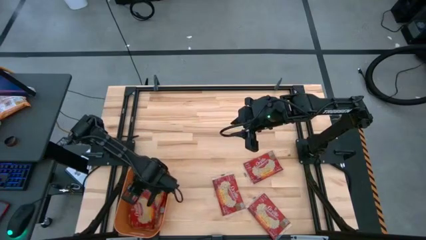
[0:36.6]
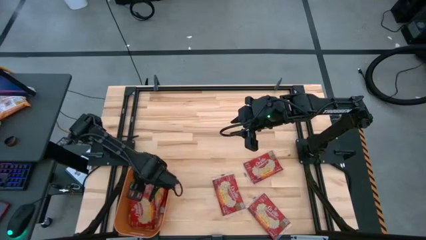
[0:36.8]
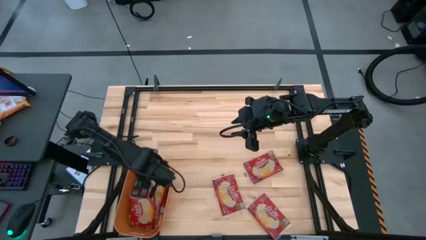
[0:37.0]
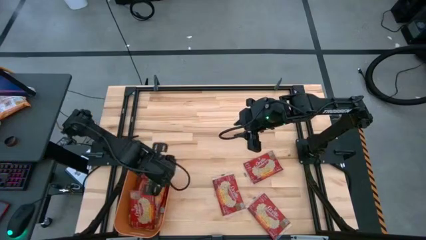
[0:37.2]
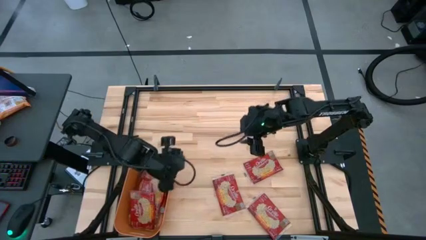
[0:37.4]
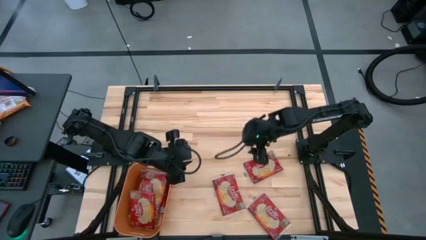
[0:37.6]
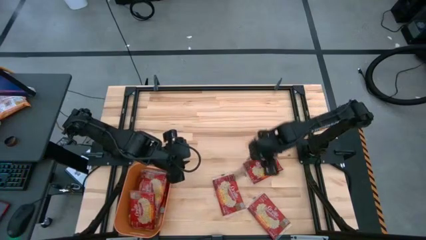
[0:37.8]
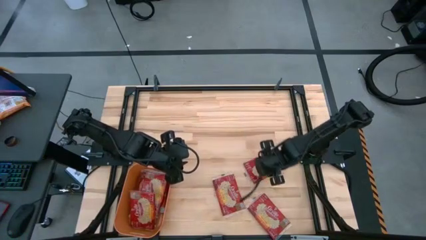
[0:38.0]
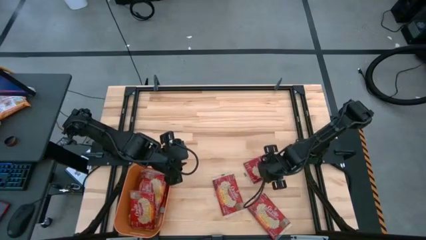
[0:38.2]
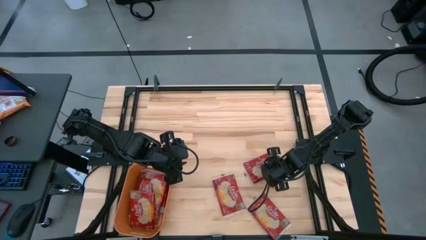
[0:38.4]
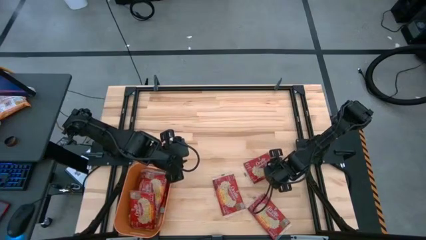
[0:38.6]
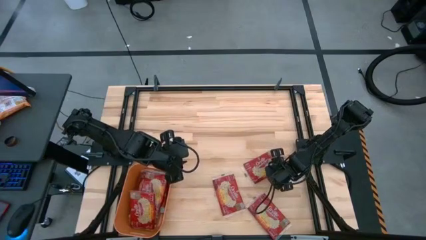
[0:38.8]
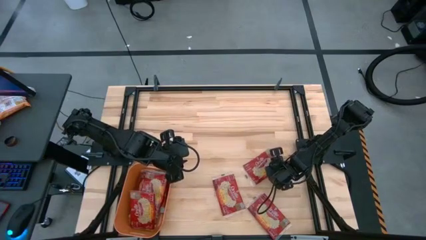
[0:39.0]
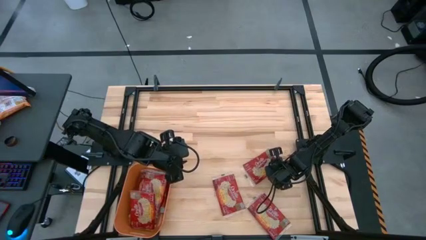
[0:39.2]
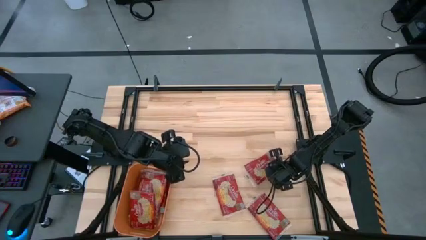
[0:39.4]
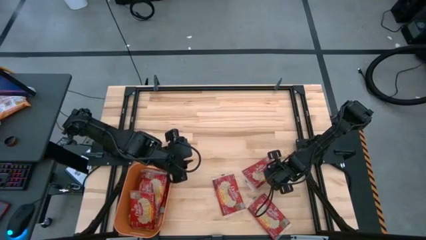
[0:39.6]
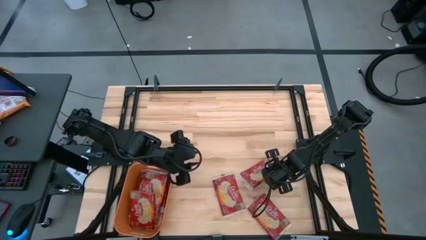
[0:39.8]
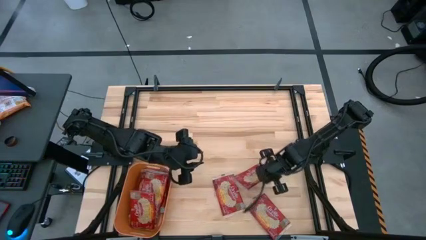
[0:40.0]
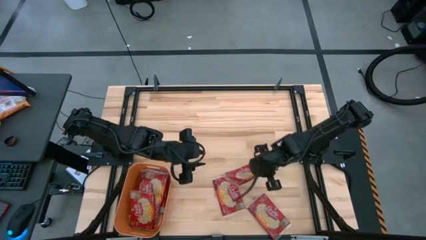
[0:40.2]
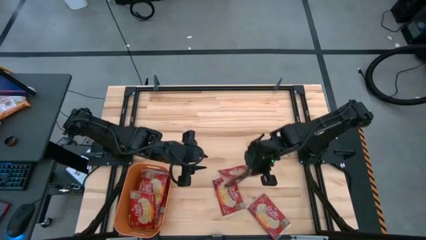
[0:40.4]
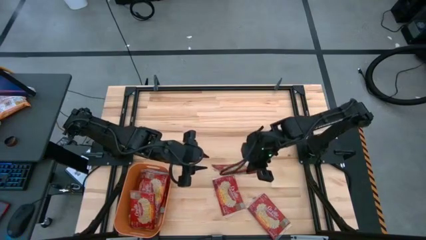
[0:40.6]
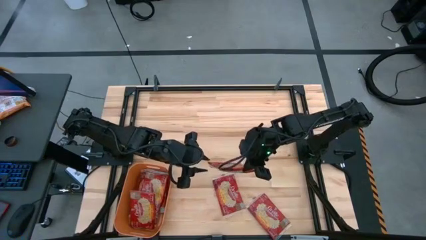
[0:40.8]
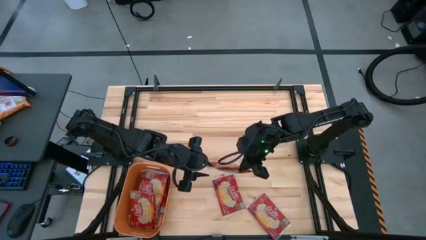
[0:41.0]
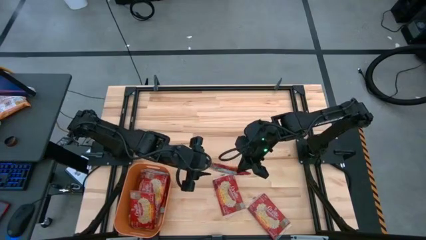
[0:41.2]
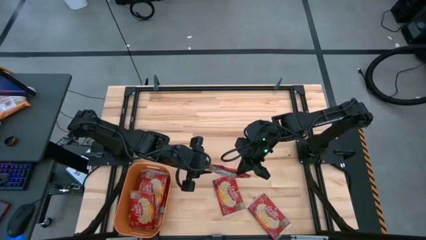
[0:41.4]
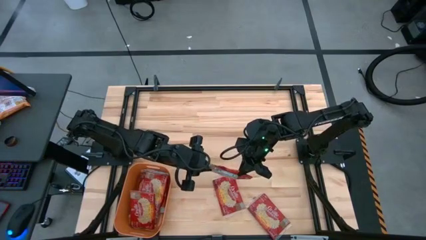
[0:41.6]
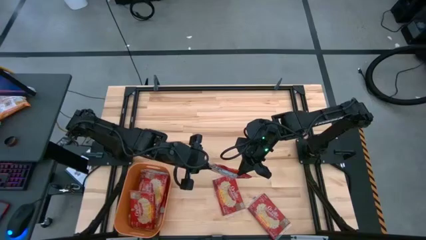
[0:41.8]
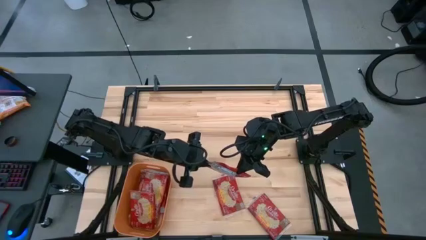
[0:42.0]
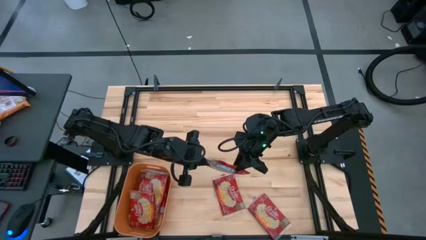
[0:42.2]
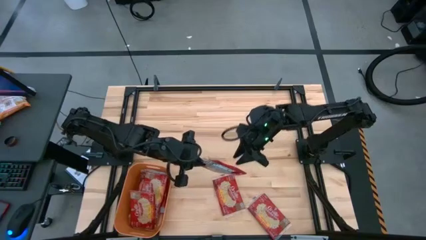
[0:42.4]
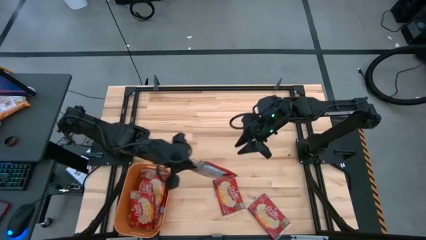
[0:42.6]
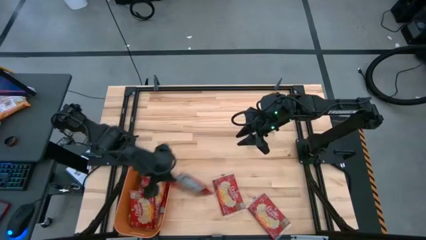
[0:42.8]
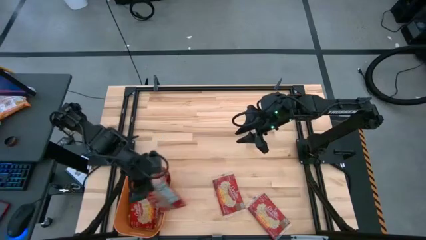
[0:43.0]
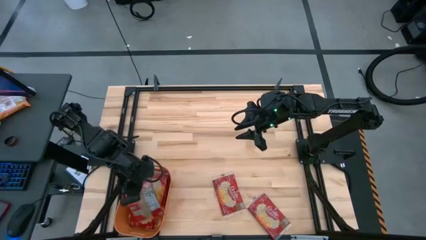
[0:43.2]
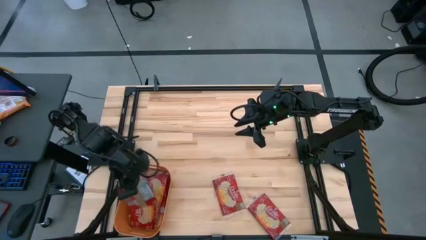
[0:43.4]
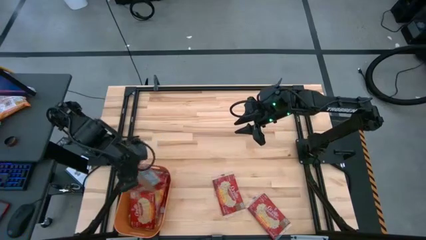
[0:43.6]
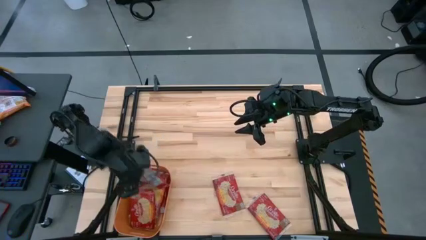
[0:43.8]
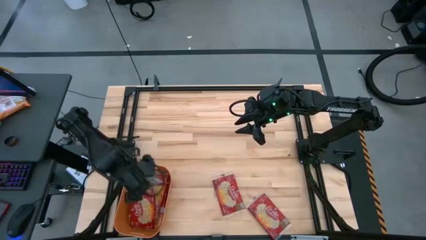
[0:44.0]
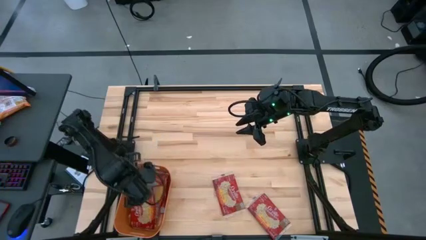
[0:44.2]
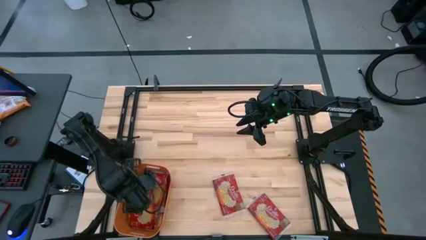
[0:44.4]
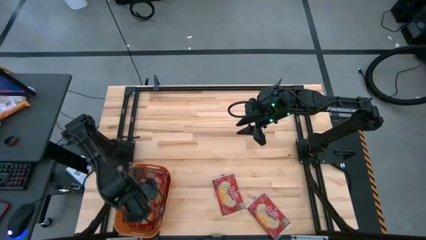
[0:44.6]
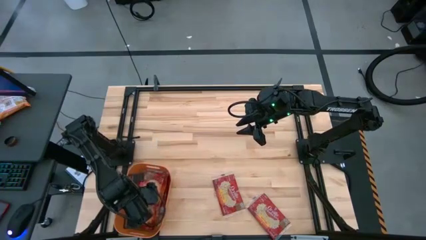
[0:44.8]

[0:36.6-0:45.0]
Task: Sort popcorn bags into baskets
Put the red popcorn bag into the orange container

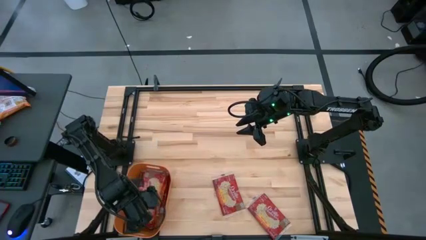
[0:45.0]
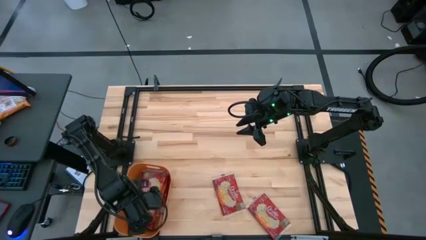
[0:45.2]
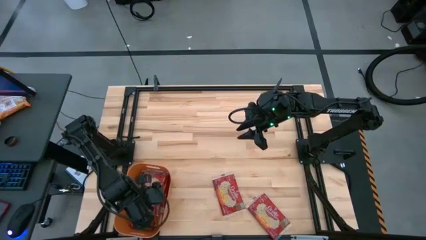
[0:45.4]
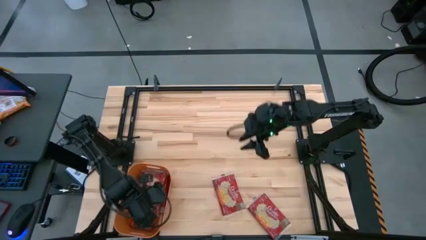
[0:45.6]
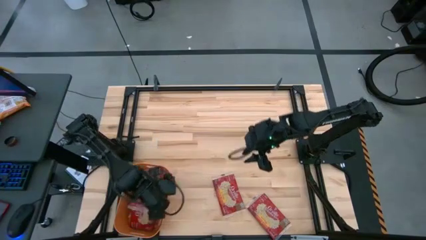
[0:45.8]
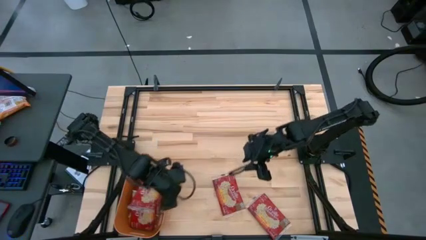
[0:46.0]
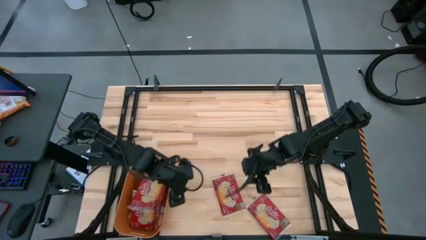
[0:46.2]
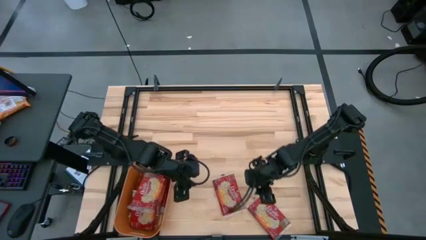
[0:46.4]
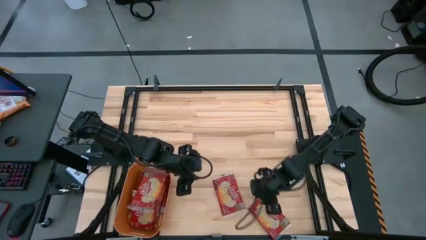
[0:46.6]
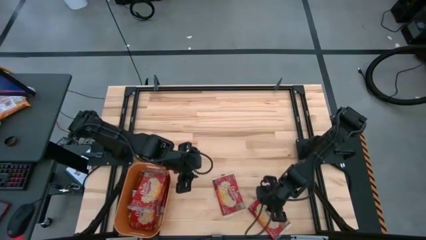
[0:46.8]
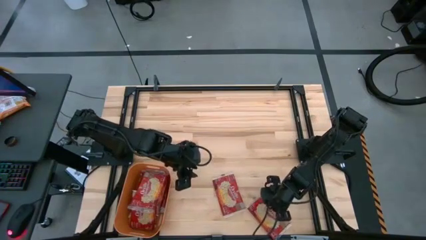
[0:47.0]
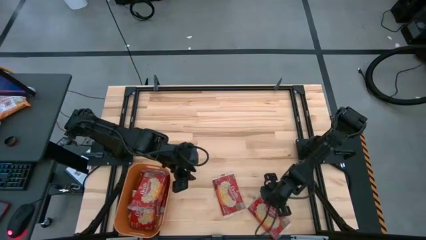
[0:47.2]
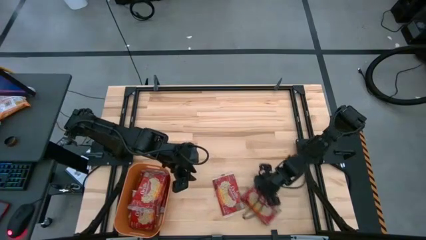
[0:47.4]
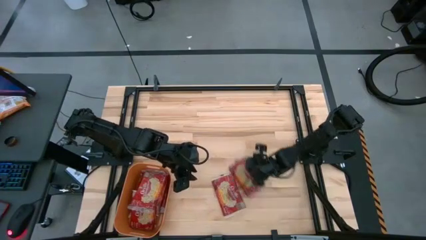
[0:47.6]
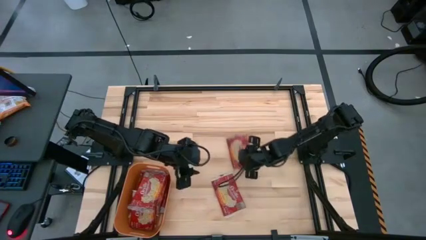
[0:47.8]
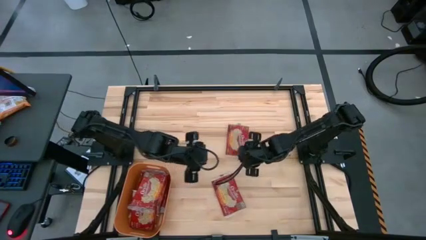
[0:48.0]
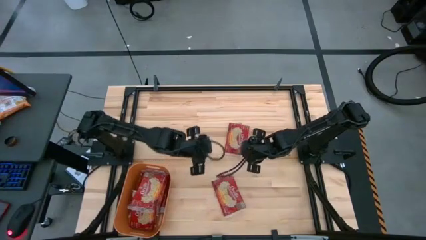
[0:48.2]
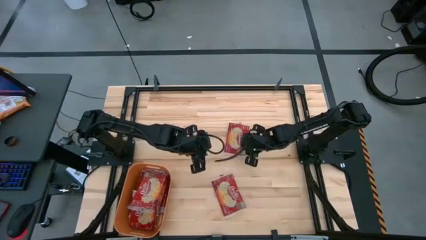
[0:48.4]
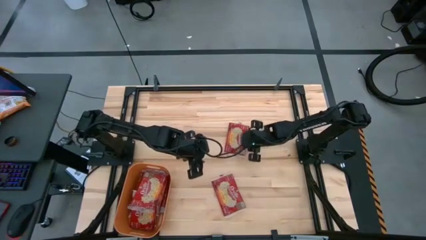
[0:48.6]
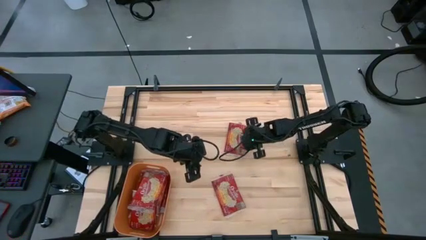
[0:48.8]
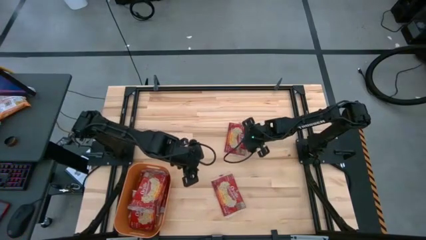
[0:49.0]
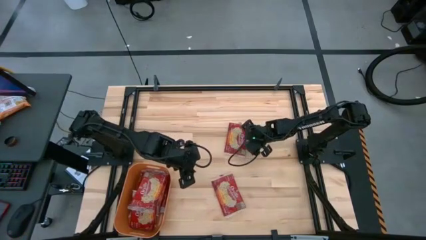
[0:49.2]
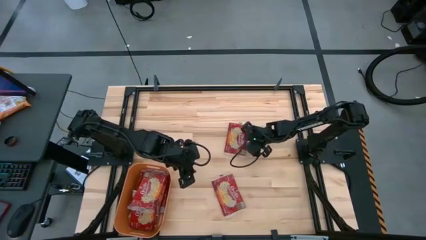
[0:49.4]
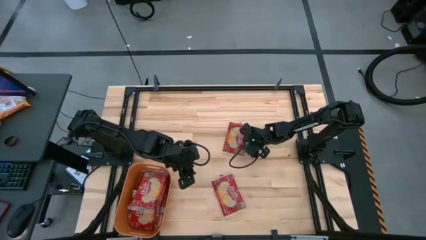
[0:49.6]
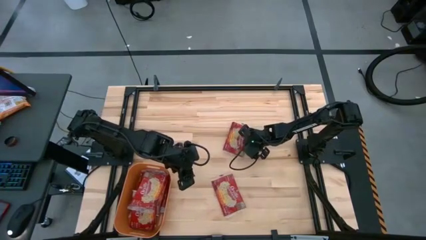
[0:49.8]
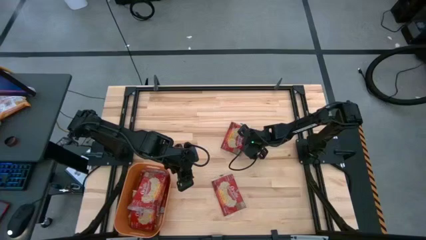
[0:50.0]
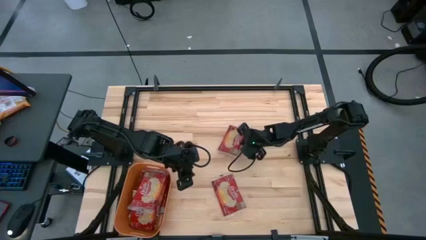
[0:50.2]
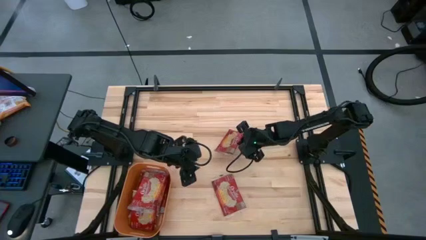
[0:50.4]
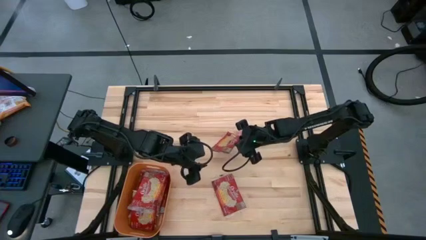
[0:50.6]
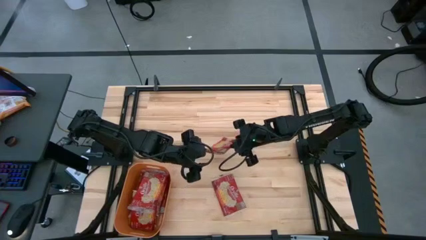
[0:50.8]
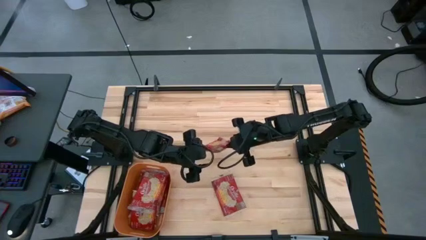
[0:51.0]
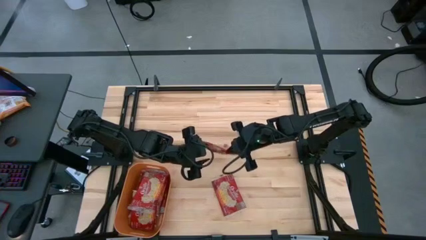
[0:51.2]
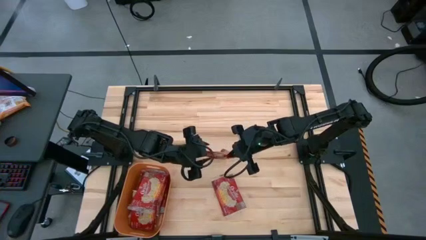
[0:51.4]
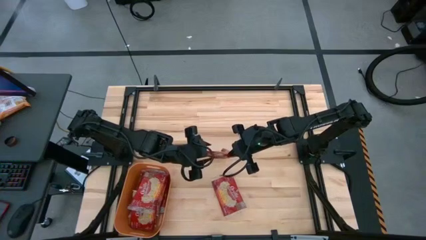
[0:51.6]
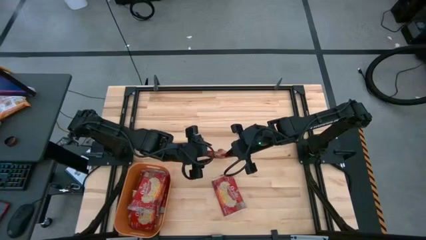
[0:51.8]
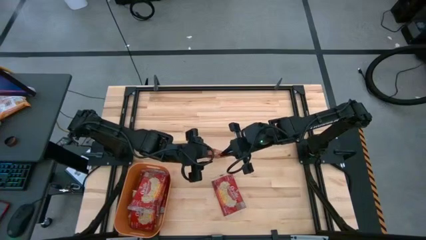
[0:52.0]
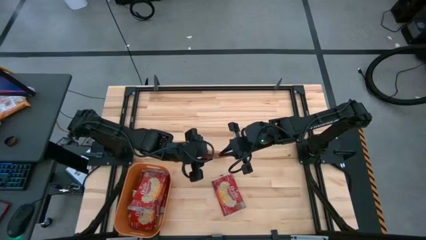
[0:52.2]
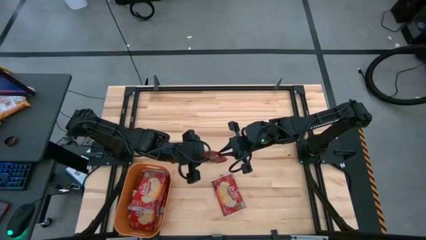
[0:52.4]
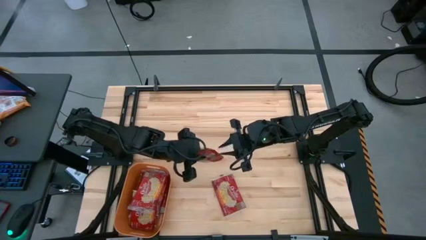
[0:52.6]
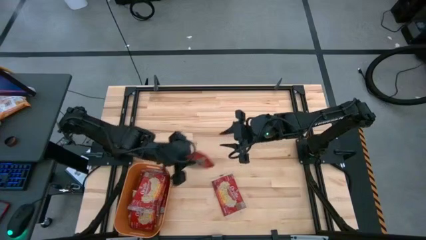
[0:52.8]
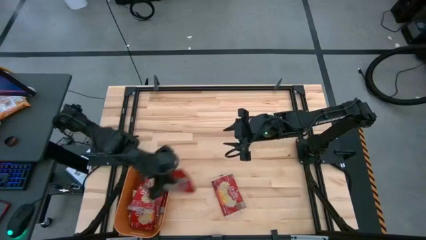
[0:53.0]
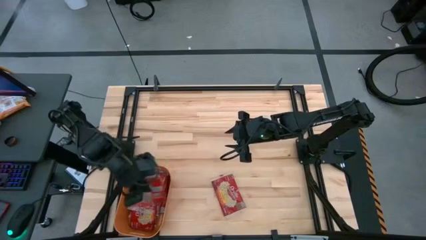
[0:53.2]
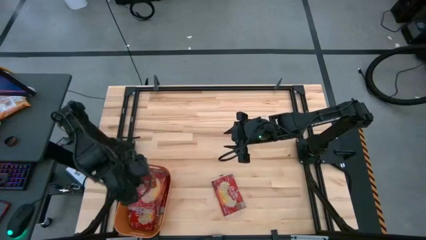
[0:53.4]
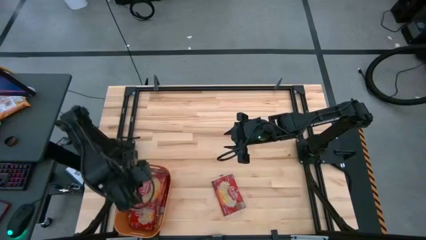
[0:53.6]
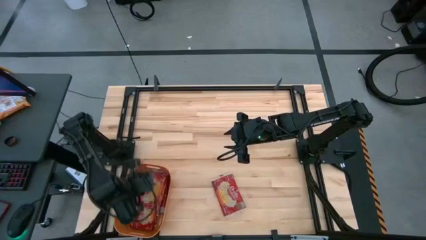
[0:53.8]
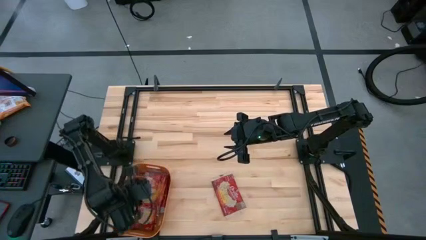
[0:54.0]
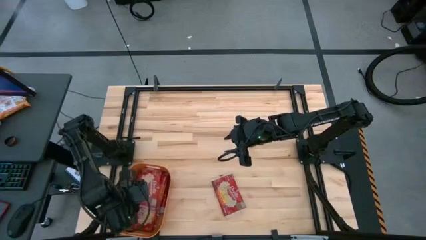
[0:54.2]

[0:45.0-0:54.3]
Put the red popcorn bag into the orange container
